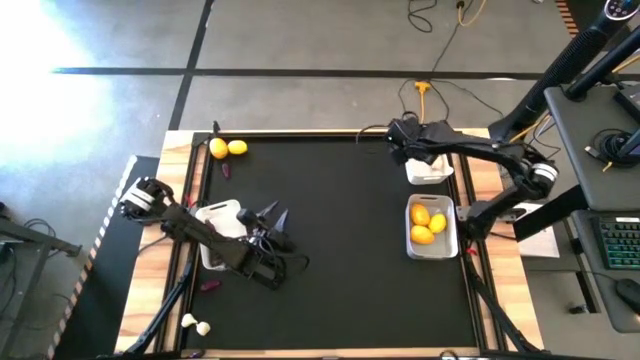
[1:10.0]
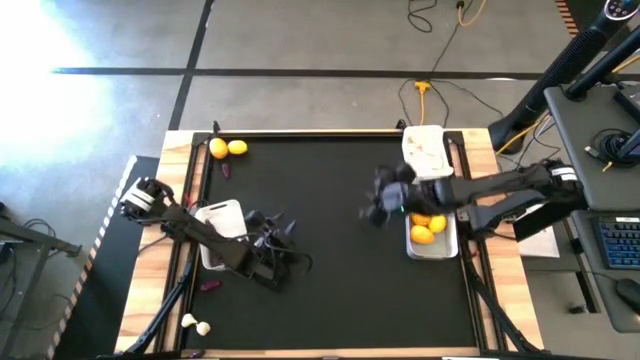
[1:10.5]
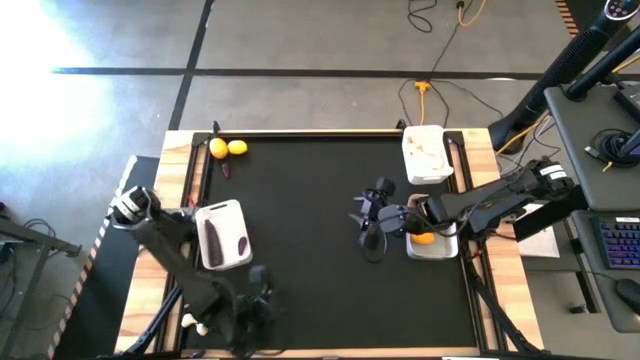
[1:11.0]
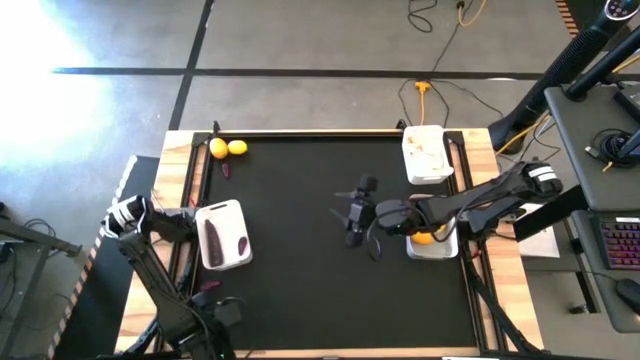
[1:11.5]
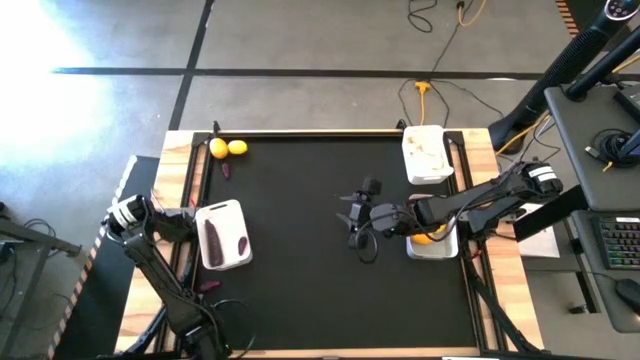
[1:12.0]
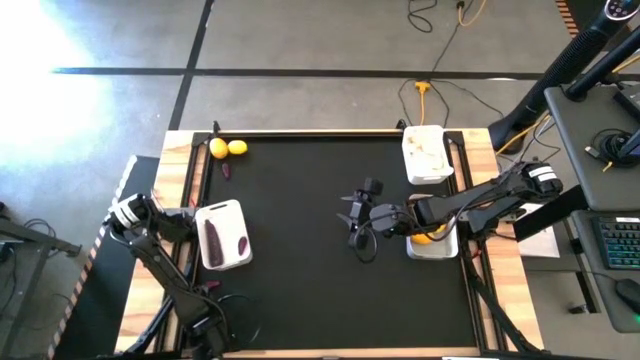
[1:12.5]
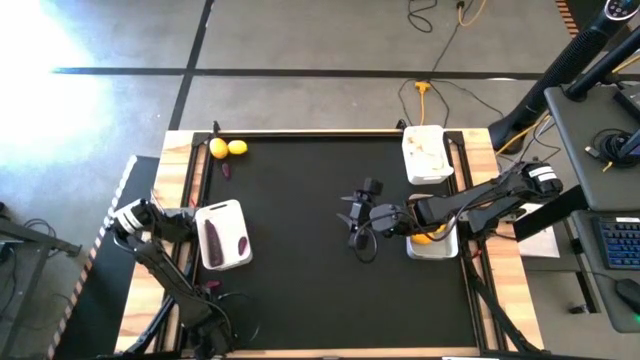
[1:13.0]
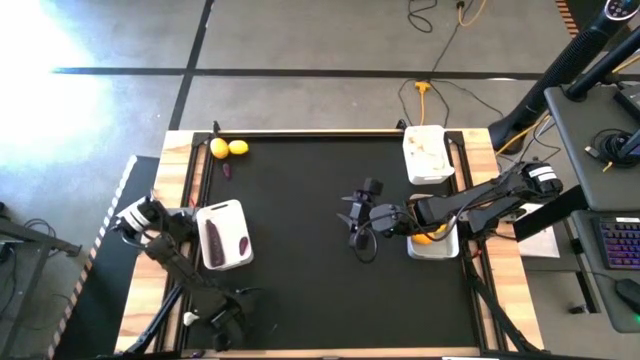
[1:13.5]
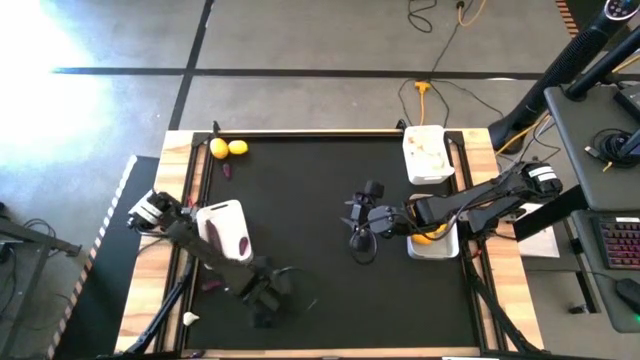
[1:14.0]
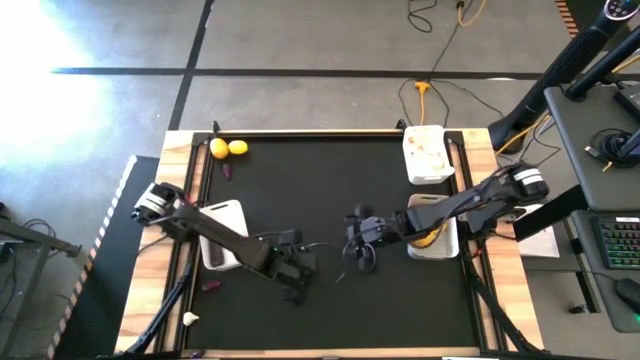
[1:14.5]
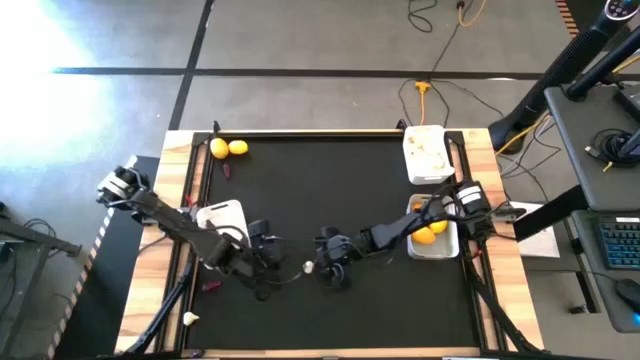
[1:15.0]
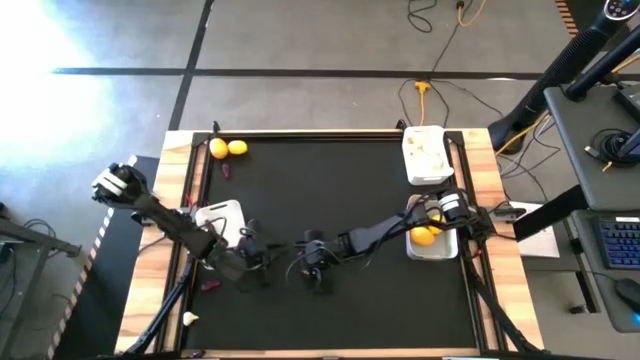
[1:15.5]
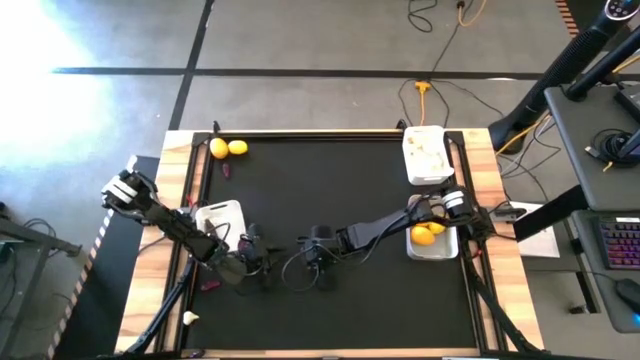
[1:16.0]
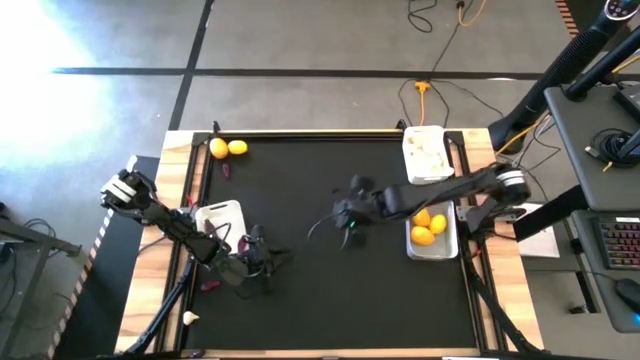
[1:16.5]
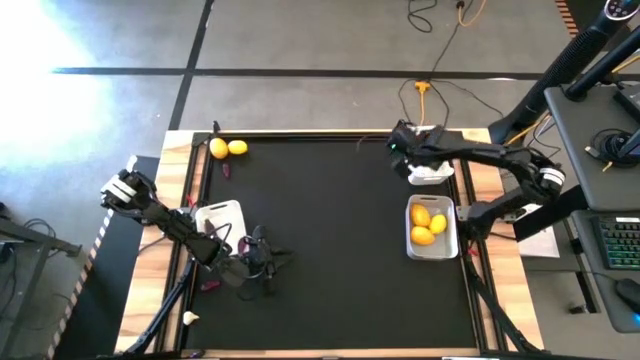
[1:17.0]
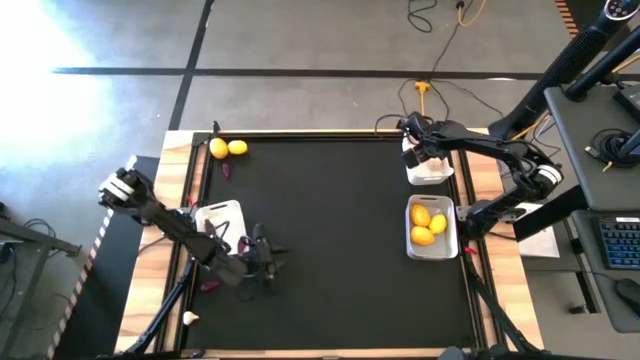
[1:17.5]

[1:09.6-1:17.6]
Task: Sort produce into baskets
Put the garlic into the top white bin

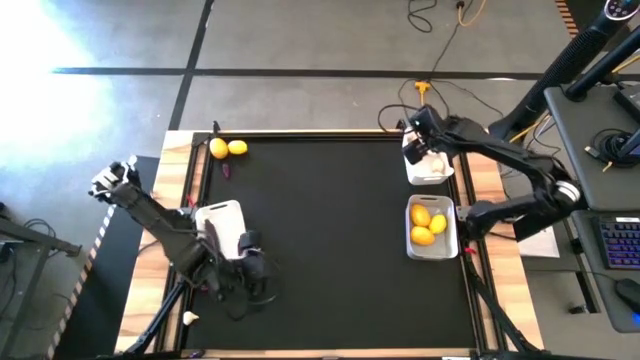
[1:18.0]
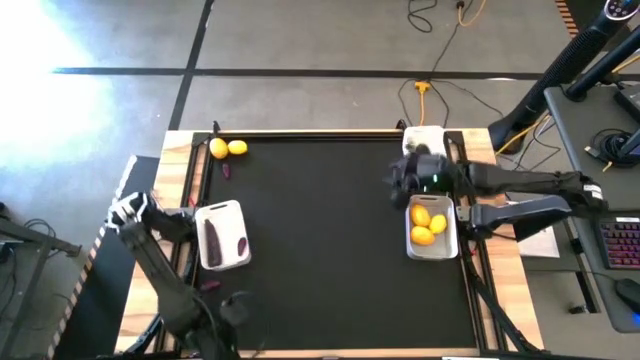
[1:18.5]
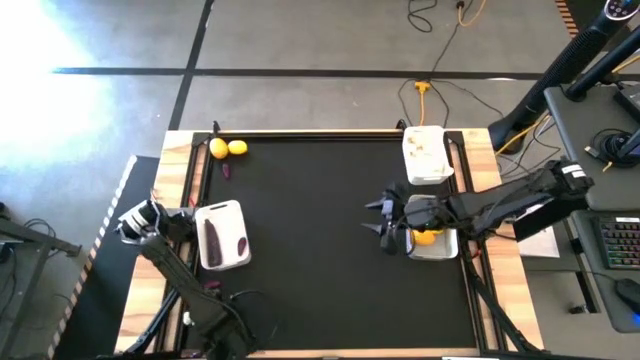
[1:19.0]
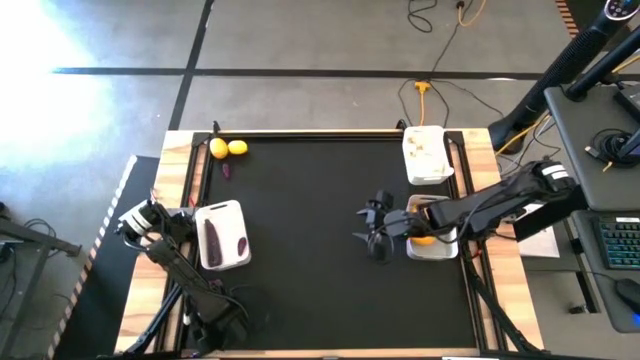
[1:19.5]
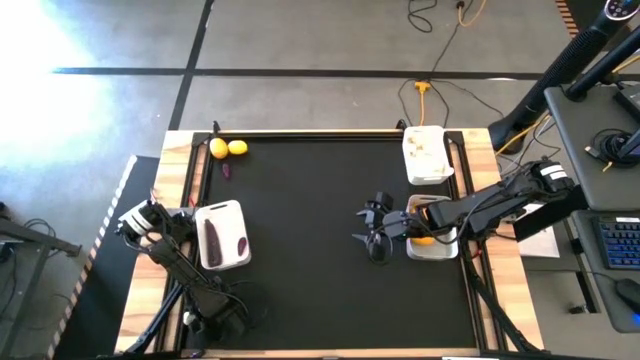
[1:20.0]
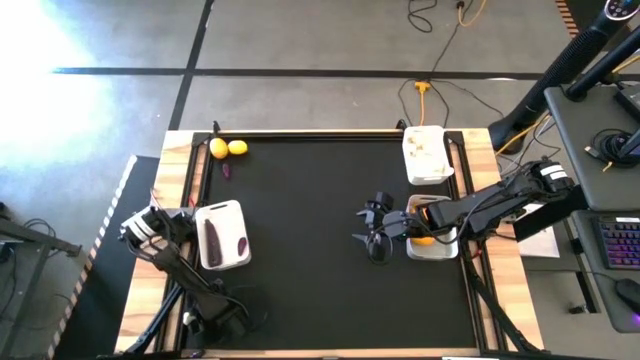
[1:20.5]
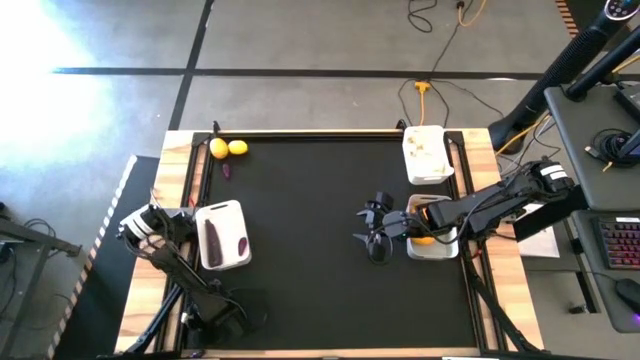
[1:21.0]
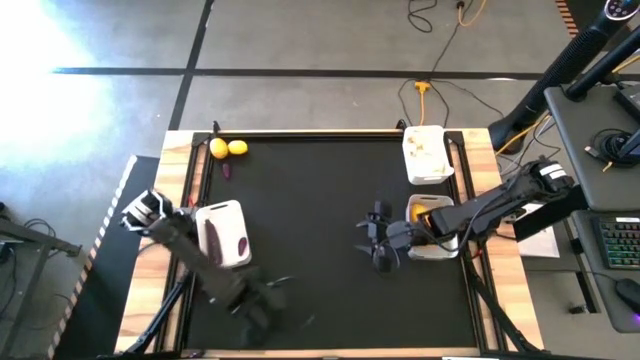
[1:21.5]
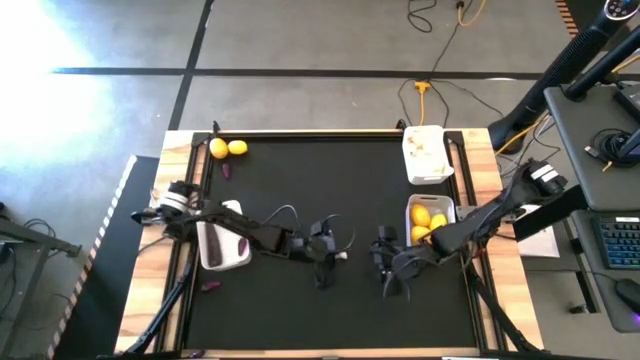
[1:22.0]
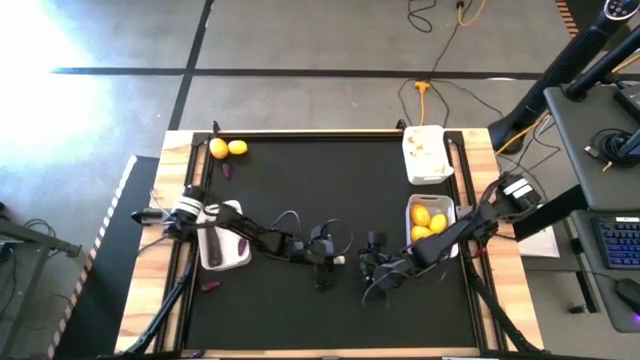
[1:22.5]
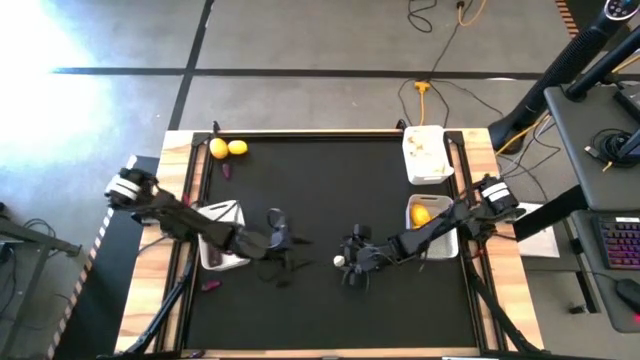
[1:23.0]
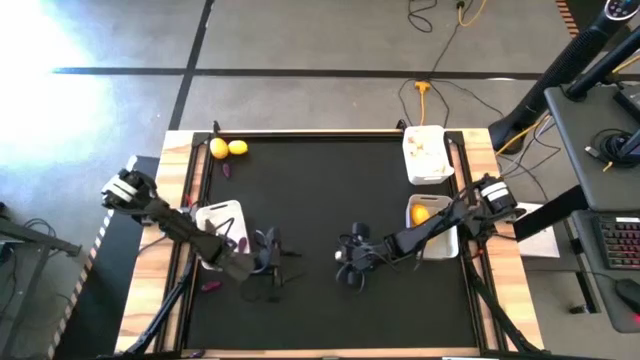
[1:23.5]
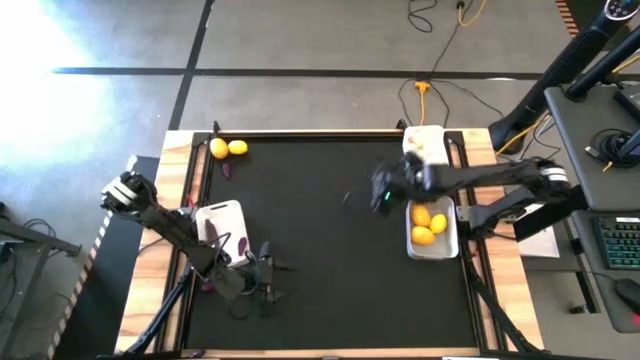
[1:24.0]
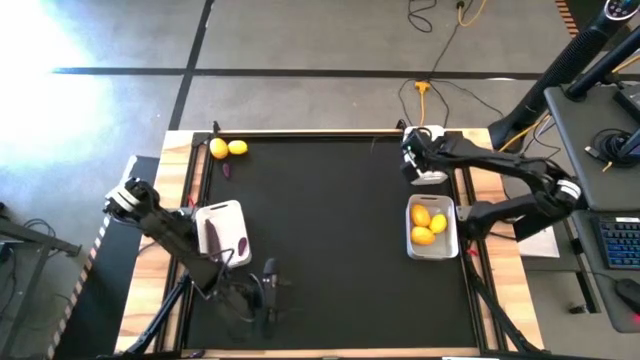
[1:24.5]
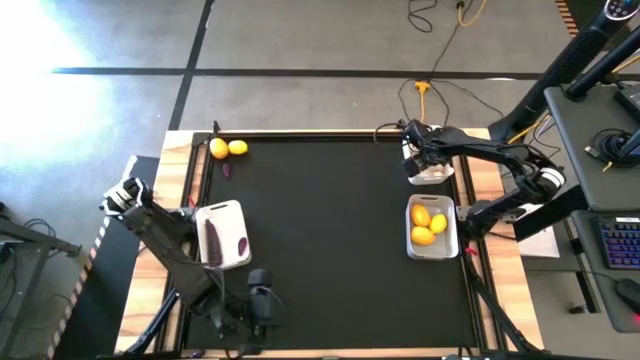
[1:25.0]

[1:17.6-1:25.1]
Put the garlic into the top white bin

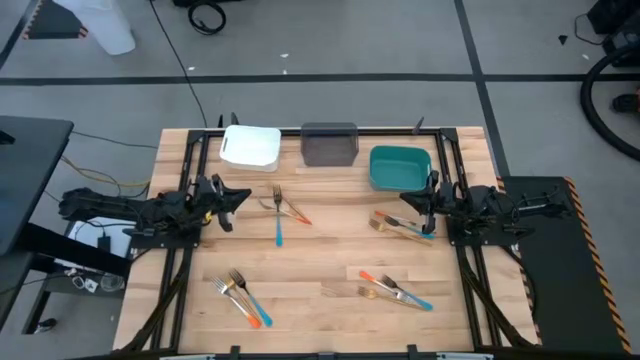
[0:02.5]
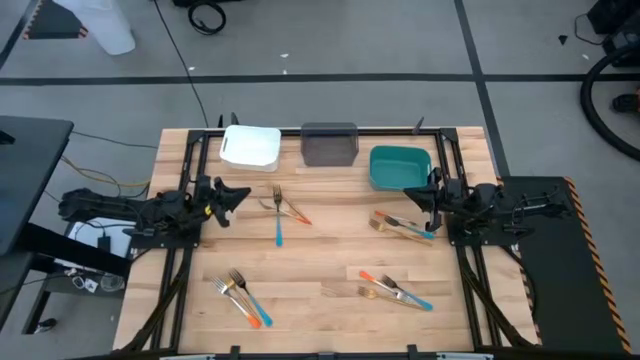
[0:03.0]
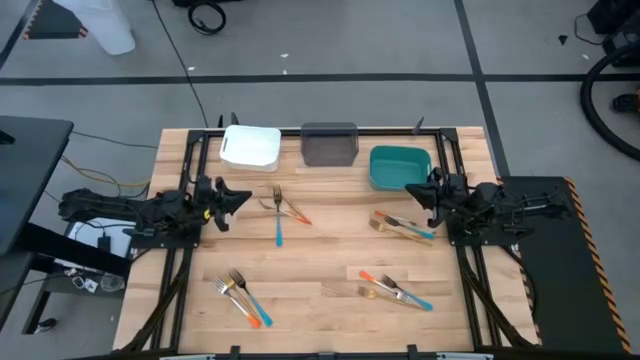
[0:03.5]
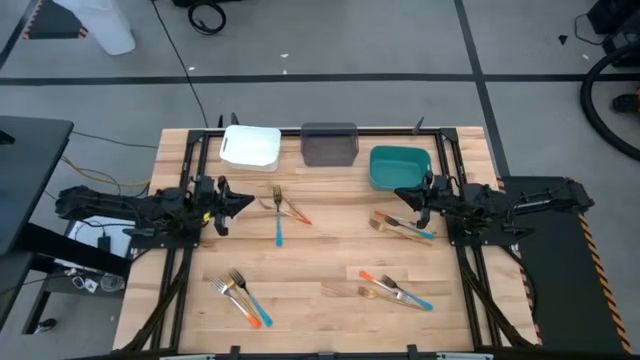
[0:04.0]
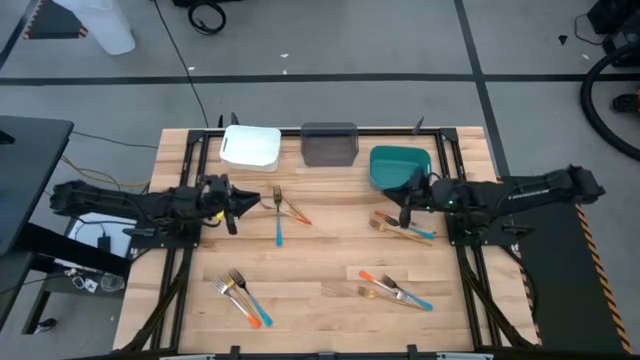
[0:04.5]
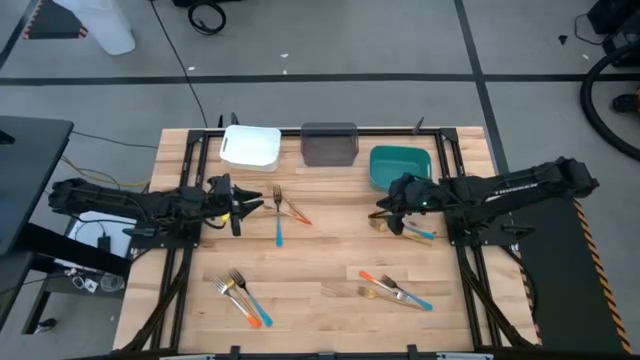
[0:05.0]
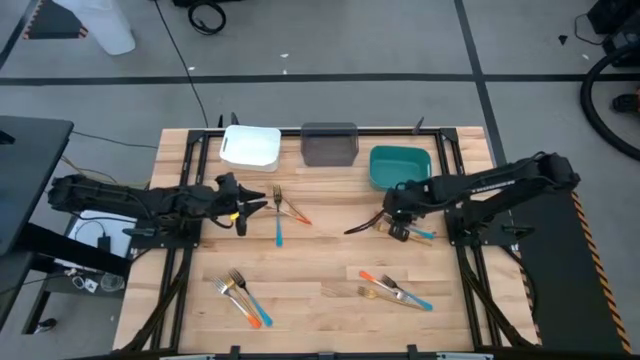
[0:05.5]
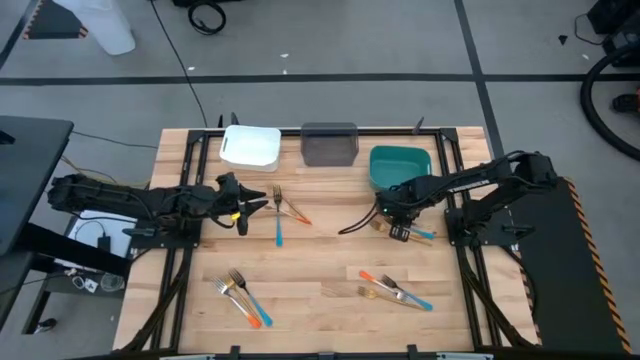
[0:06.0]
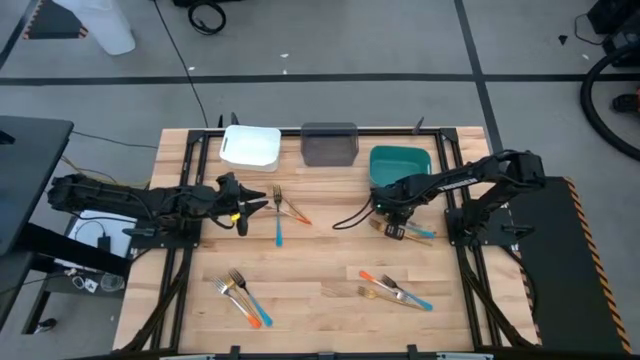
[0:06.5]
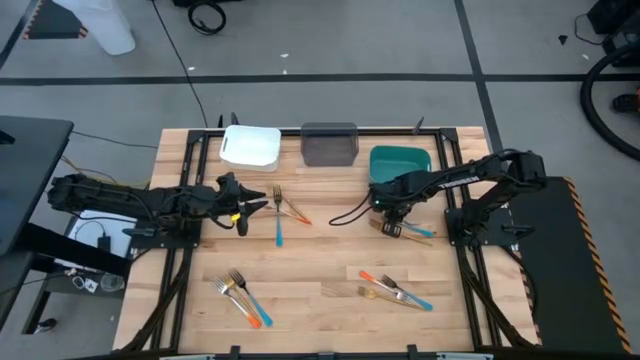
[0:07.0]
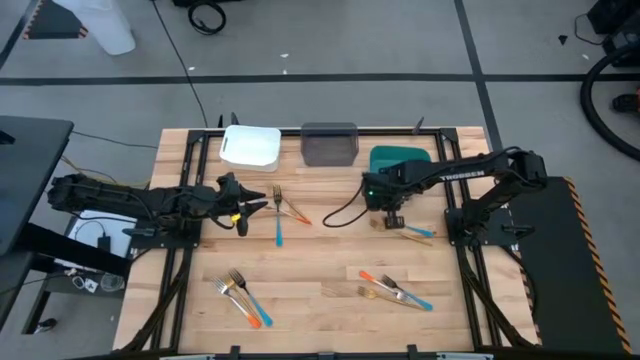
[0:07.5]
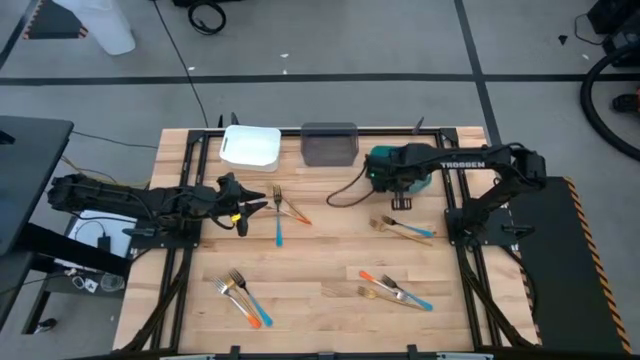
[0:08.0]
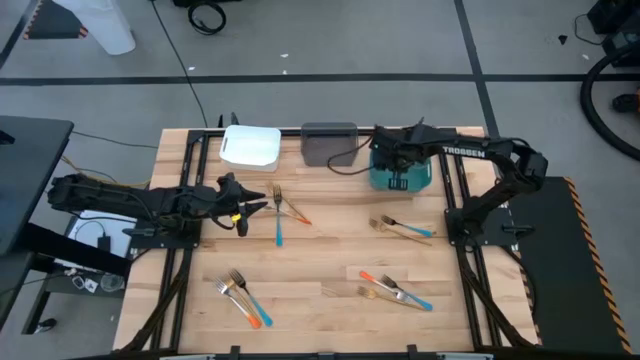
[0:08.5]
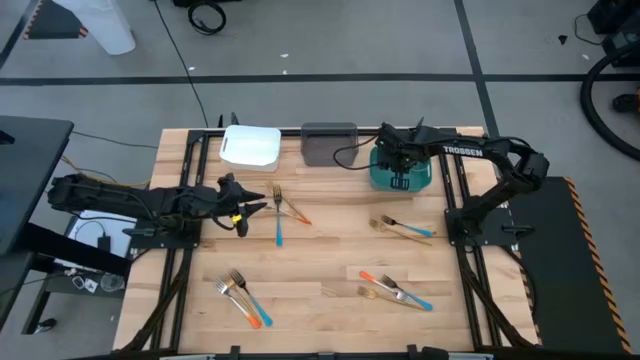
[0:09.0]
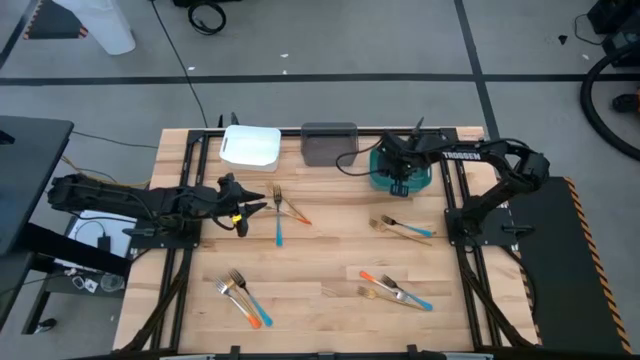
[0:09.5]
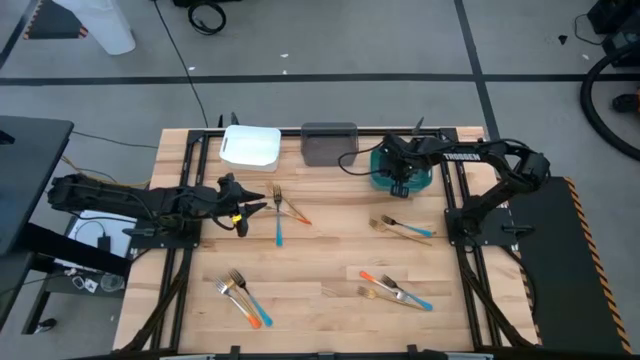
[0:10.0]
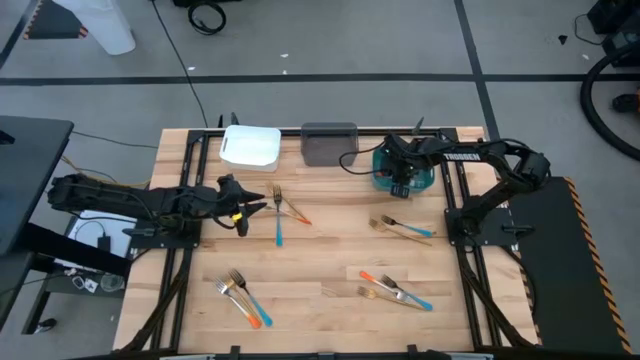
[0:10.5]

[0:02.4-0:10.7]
Task: Sort silverware by color (type)
Put the orange fork into the green bin
